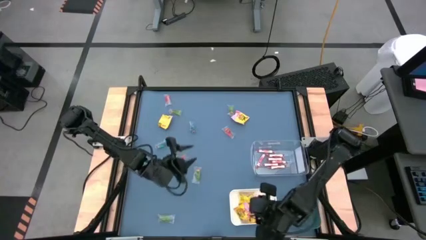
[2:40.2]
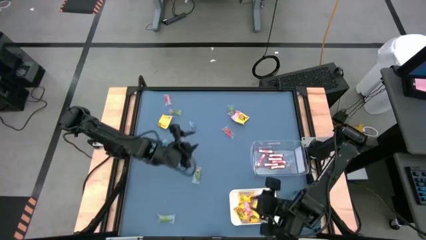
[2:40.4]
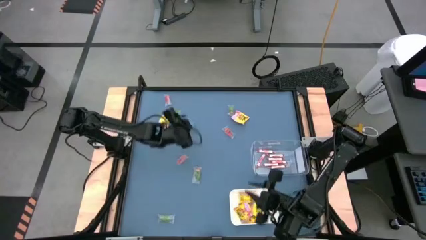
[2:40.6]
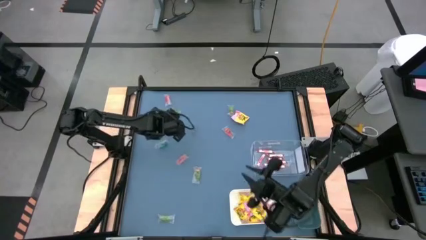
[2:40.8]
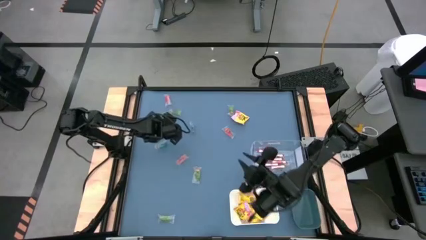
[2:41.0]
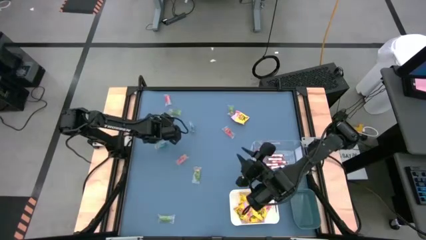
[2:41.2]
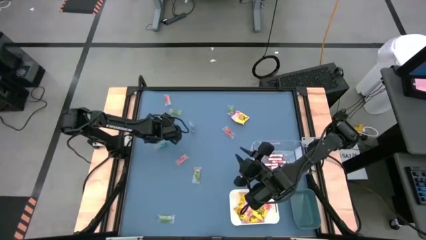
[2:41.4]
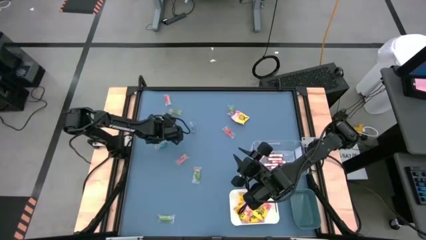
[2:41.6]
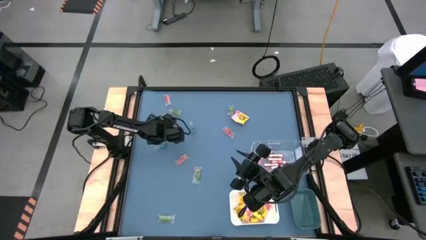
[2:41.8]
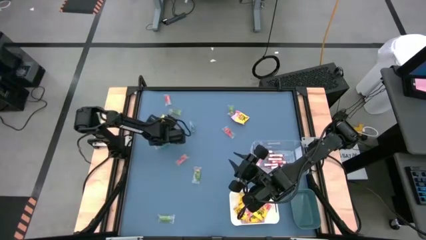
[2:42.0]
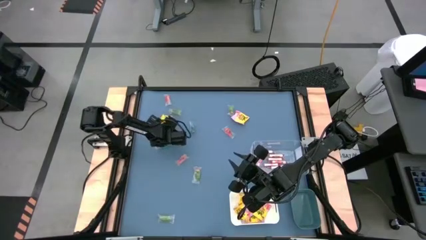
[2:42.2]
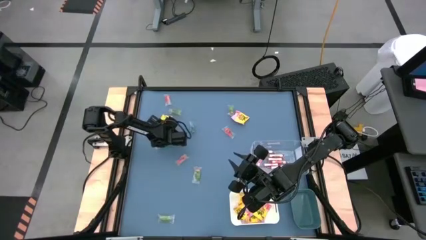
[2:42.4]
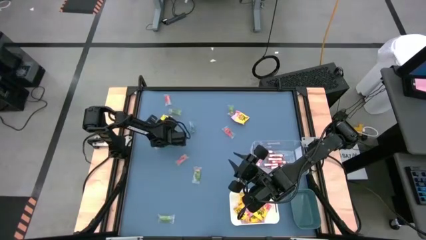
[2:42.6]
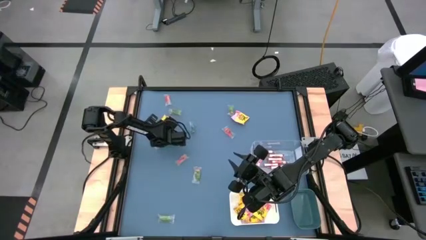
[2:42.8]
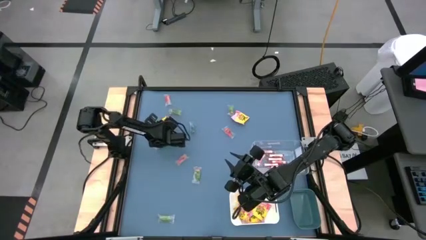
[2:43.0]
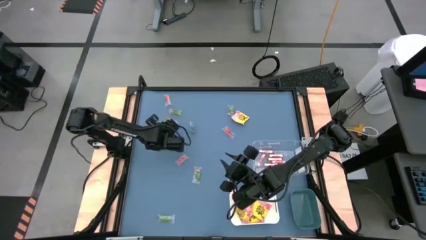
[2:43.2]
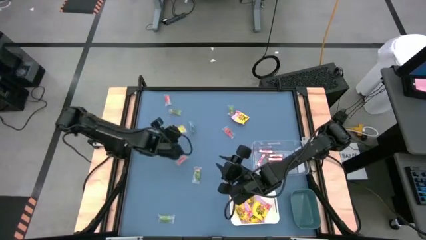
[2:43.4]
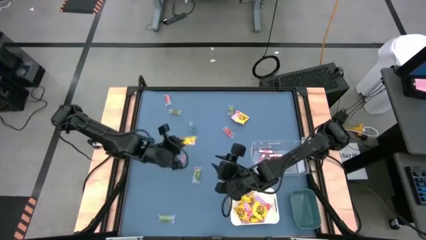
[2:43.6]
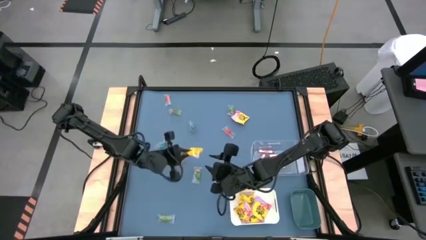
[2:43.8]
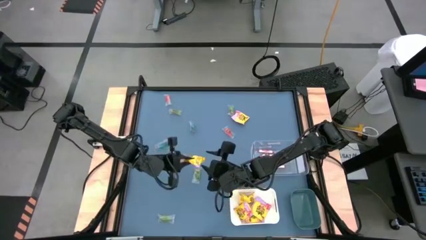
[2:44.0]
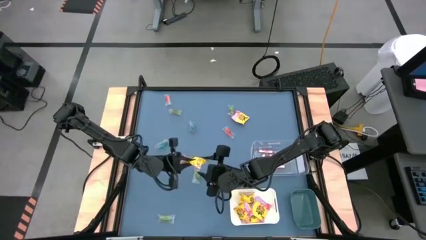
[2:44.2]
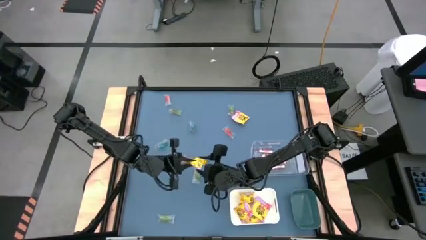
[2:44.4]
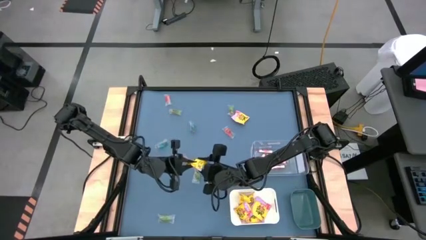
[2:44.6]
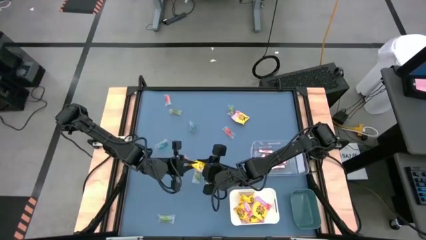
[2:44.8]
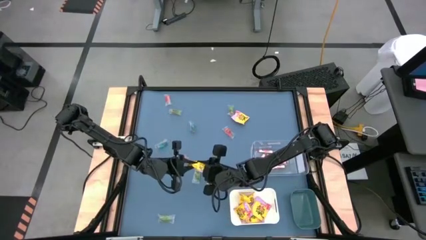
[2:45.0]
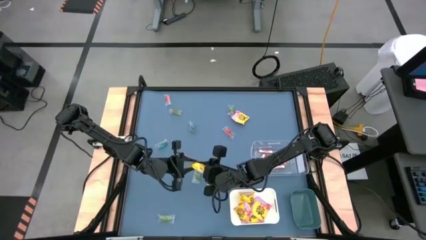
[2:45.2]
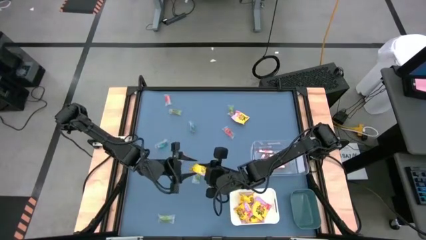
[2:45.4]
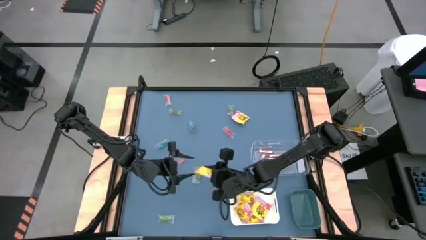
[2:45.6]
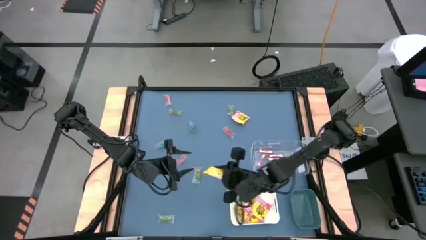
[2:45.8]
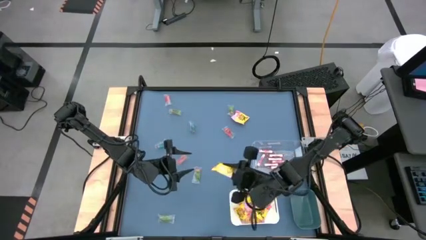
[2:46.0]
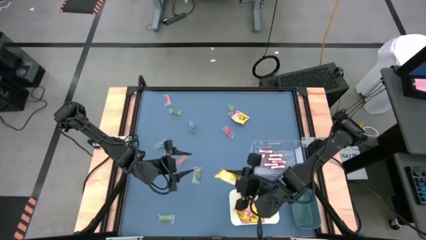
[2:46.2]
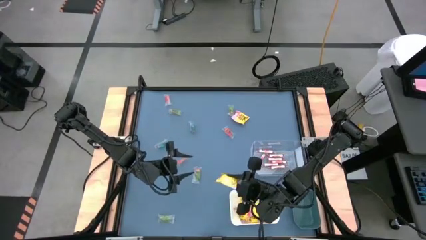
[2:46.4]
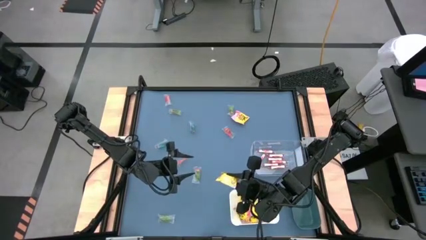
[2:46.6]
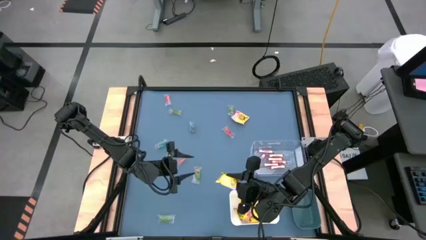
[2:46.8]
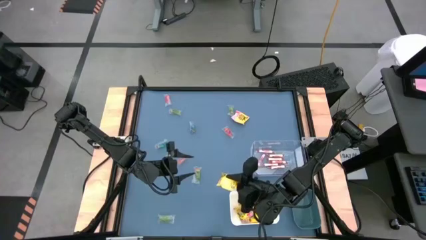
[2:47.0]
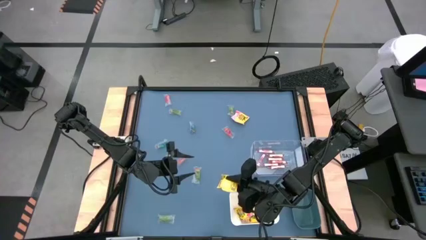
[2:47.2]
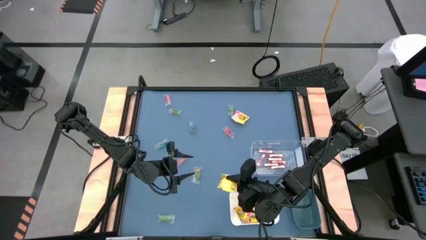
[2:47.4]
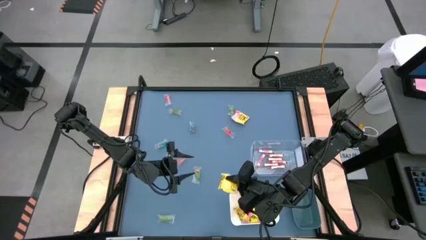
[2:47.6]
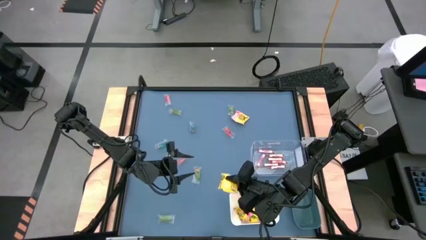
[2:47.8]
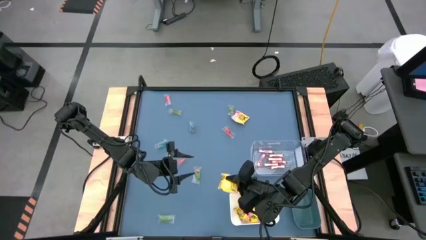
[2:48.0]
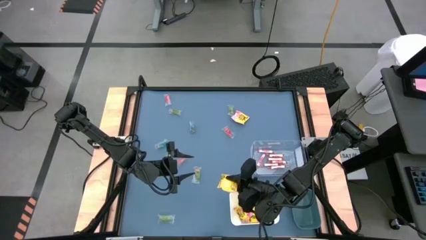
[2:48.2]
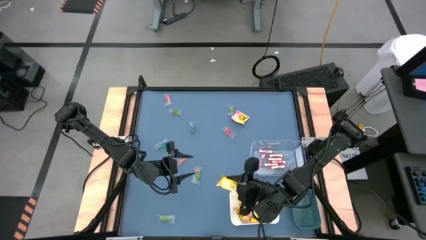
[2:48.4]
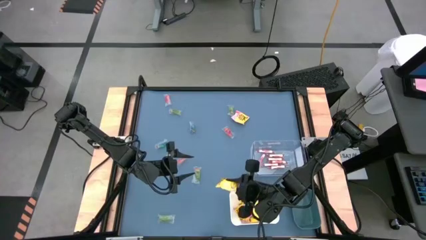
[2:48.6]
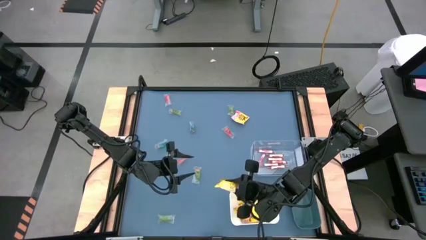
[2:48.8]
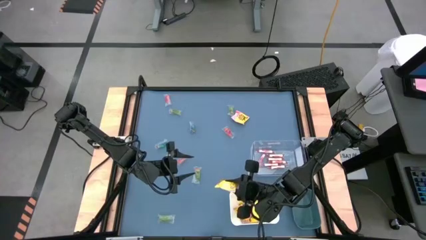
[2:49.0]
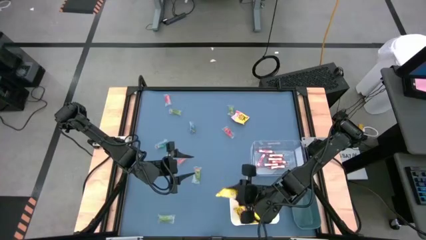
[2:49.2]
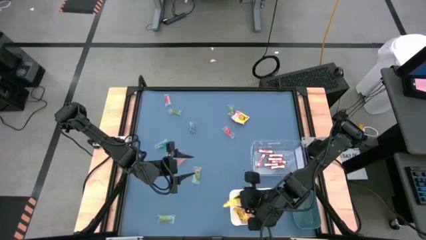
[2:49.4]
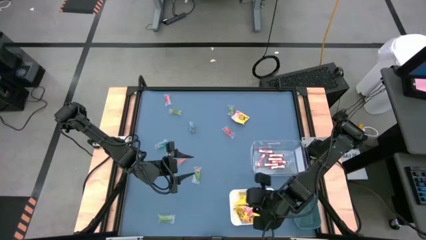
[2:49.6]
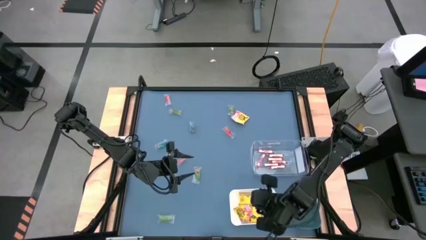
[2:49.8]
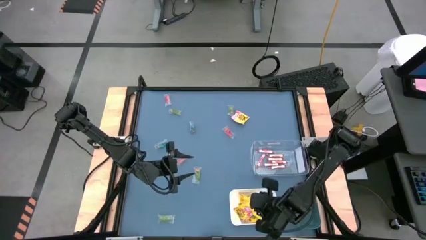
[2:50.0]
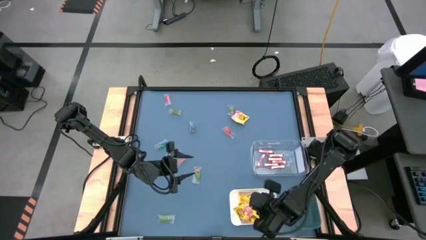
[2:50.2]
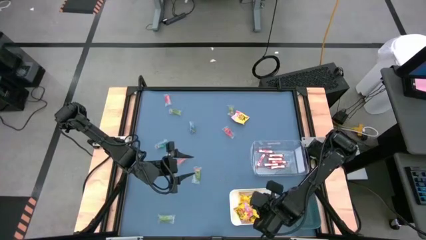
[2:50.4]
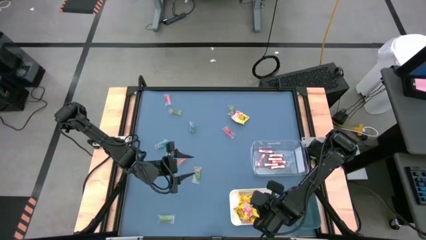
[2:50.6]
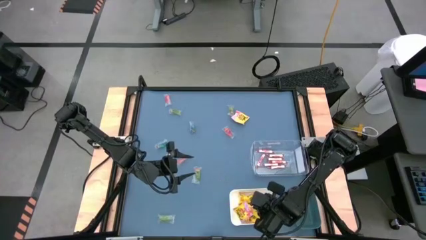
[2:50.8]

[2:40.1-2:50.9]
Task: Sort candy
Put the yellow candy into the white bin

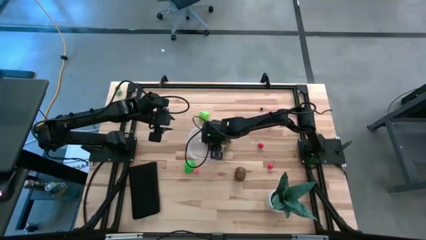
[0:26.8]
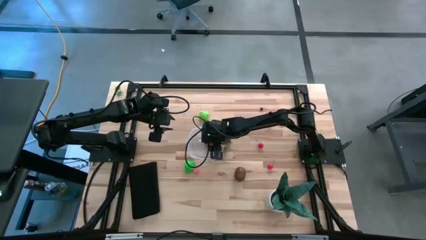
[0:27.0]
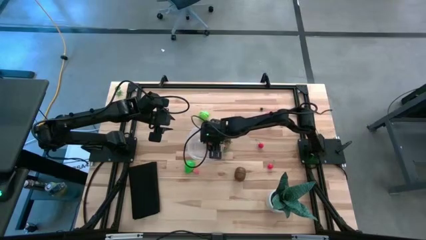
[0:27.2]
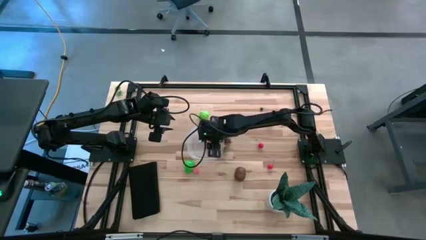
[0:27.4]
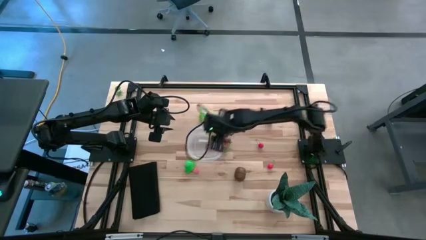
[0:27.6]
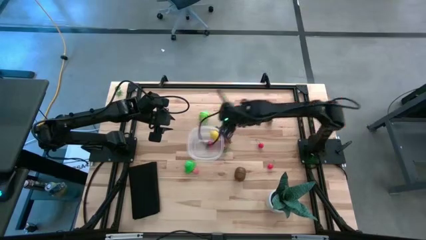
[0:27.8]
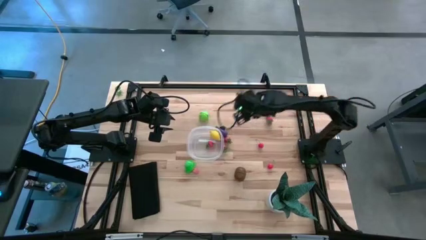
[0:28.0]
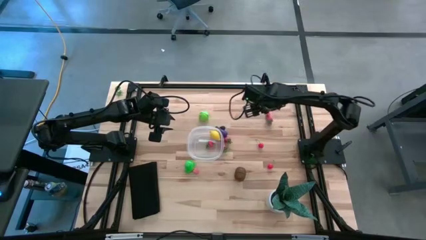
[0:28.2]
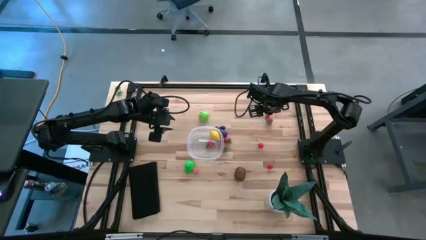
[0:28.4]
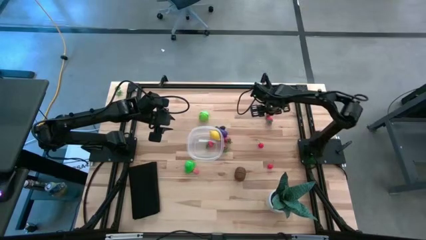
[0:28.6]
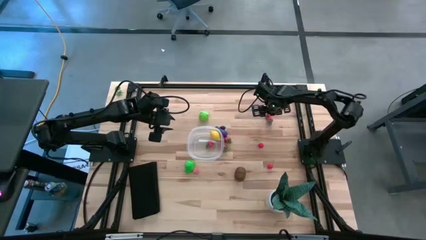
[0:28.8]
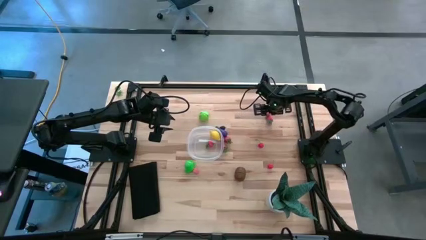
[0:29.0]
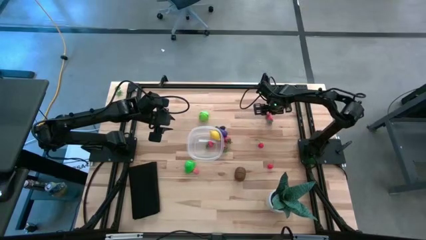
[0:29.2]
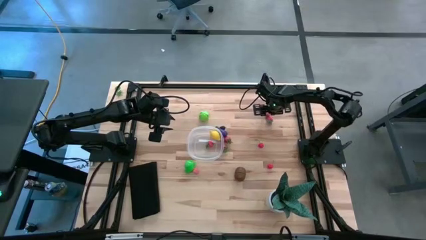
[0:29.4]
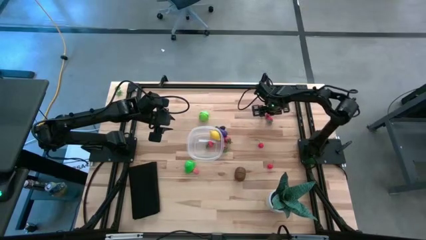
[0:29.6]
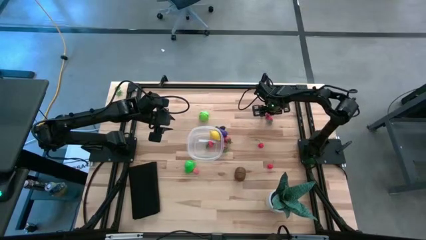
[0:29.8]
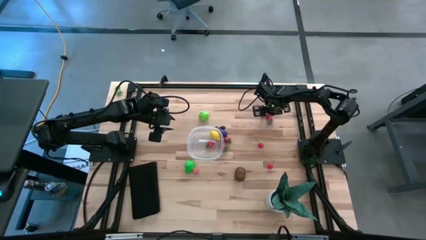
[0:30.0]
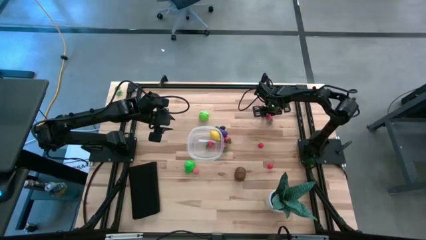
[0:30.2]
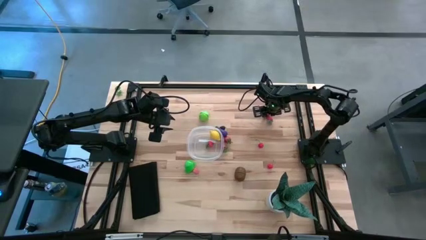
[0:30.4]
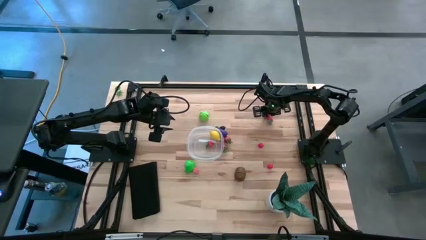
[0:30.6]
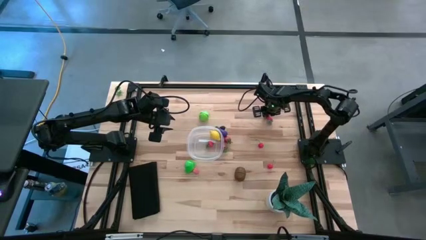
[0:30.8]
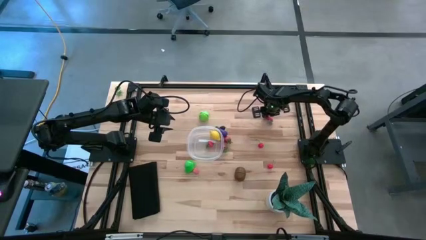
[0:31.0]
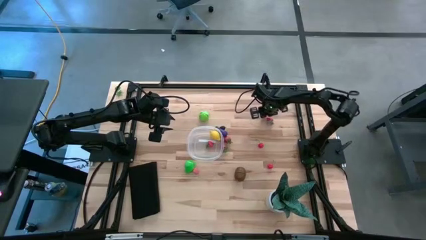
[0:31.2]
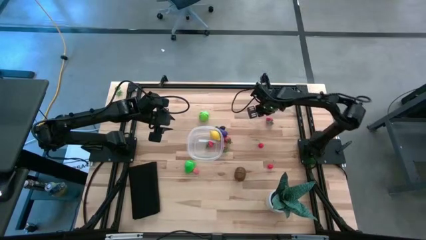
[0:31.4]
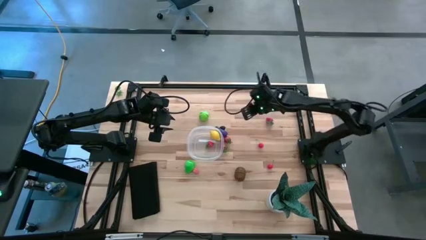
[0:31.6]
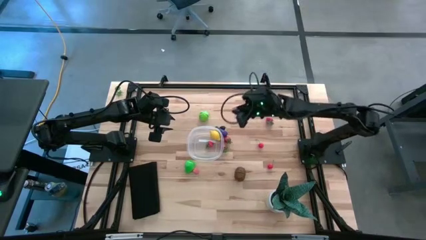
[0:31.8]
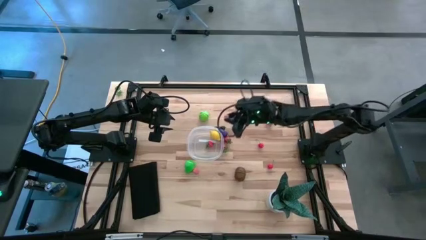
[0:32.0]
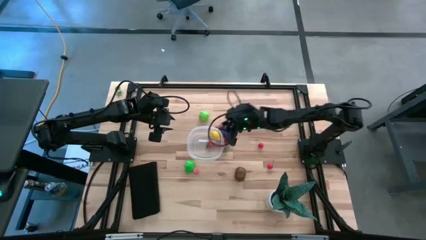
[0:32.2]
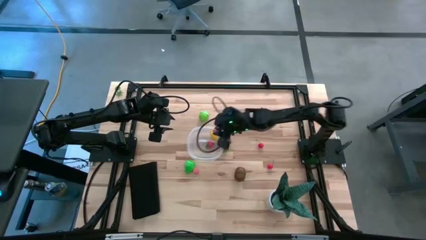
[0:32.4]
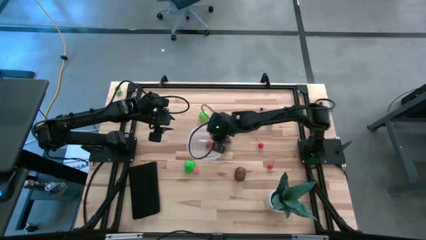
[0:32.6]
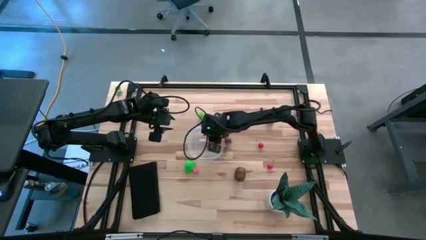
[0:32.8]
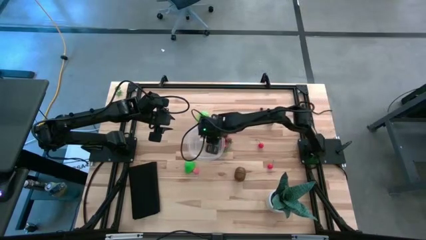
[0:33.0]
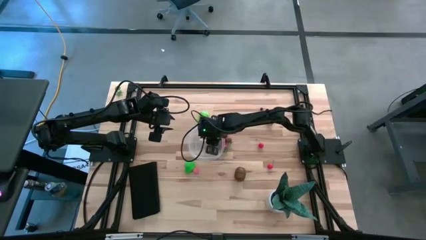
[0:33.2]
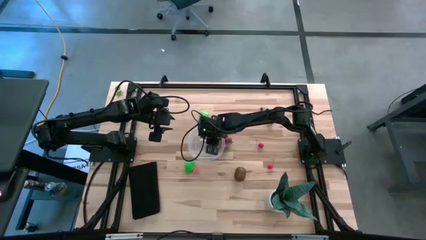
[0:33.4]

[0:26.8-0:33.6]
Task: Pick and placing Produce into tupperware
Put the top peach into the transparent bin
